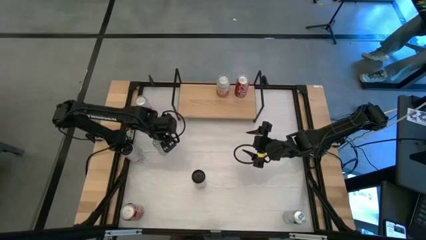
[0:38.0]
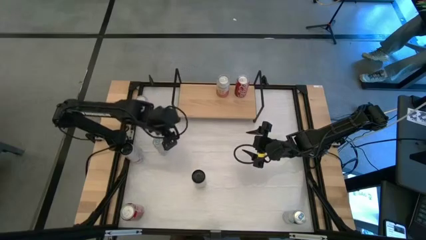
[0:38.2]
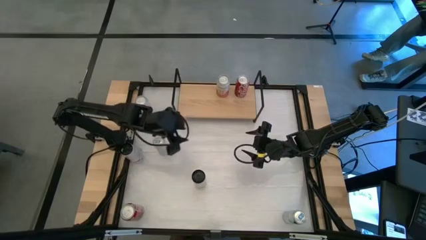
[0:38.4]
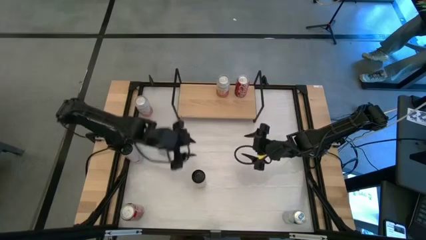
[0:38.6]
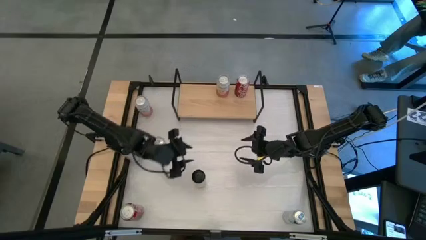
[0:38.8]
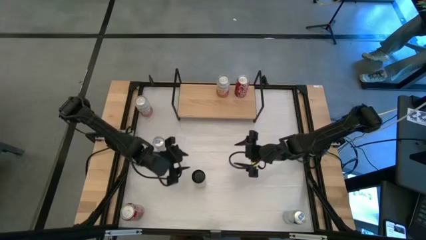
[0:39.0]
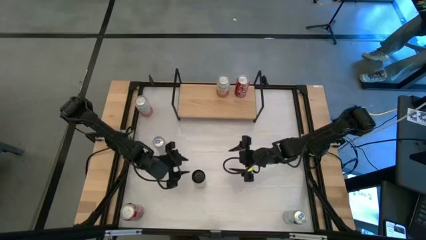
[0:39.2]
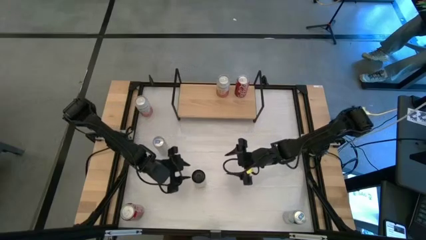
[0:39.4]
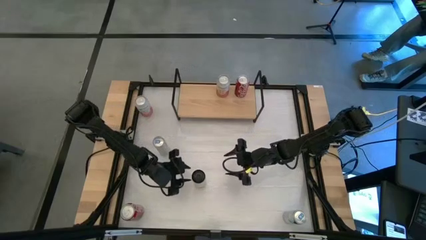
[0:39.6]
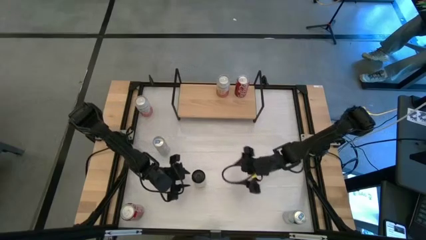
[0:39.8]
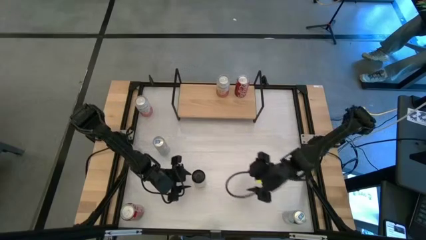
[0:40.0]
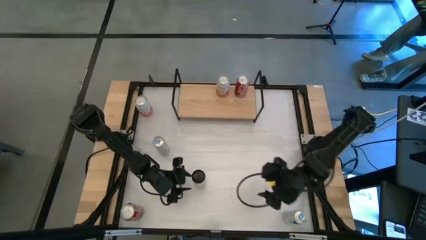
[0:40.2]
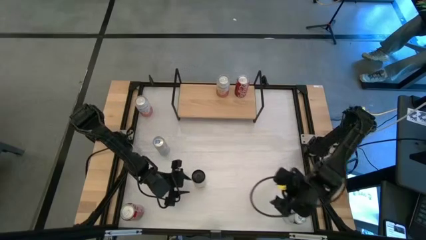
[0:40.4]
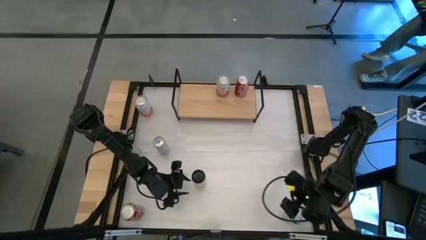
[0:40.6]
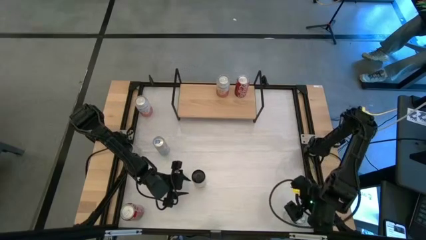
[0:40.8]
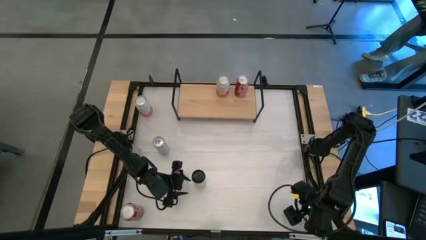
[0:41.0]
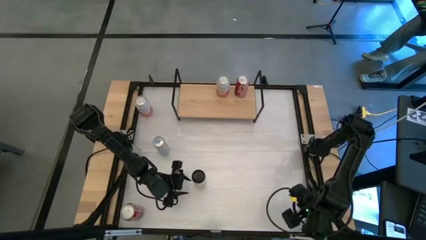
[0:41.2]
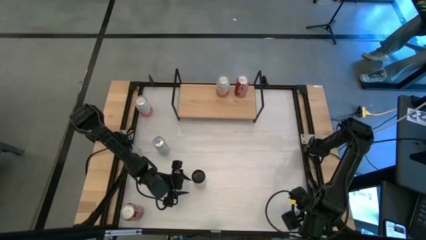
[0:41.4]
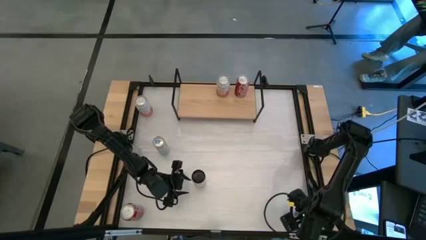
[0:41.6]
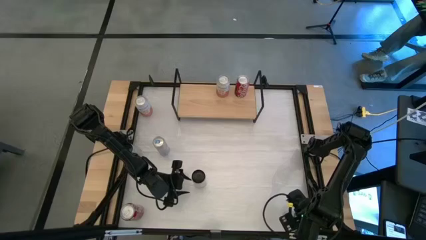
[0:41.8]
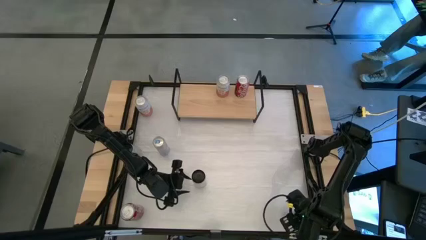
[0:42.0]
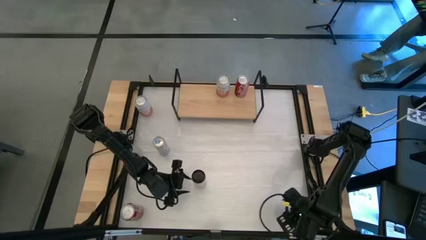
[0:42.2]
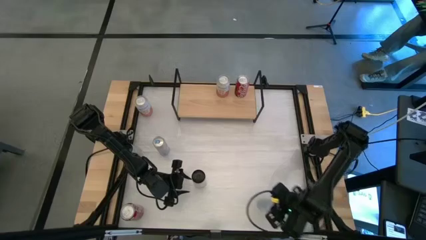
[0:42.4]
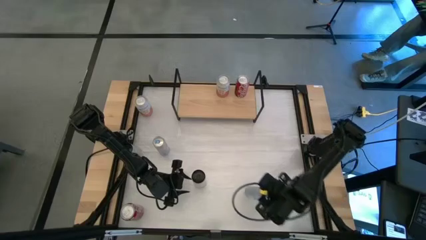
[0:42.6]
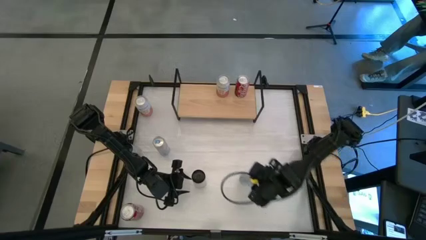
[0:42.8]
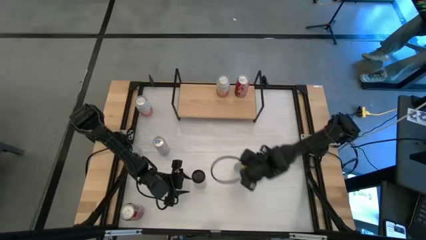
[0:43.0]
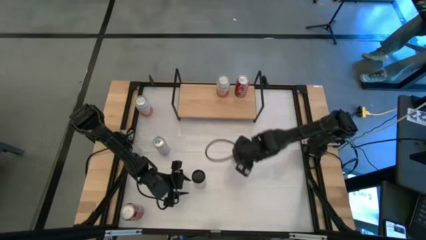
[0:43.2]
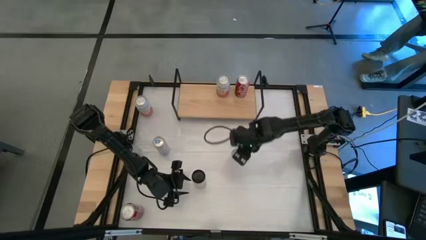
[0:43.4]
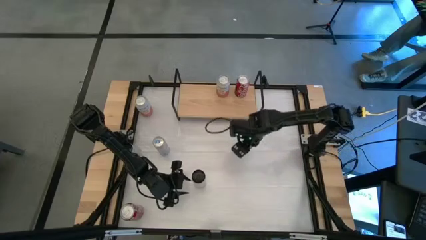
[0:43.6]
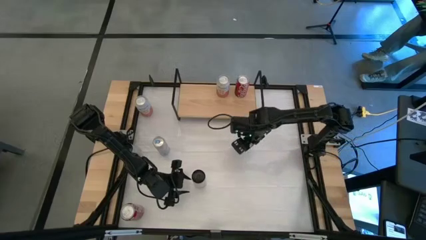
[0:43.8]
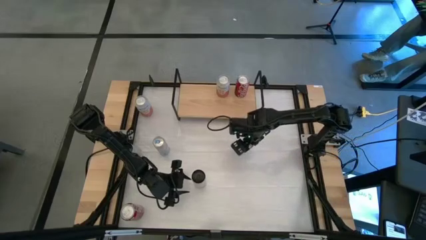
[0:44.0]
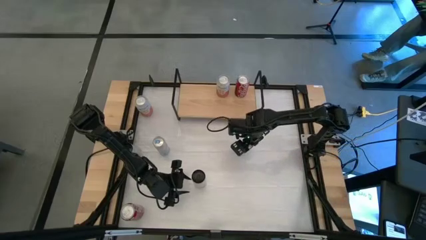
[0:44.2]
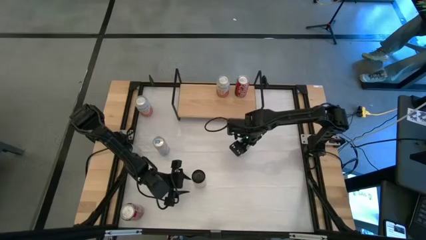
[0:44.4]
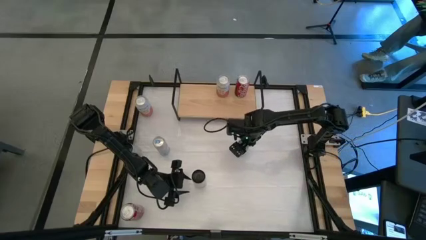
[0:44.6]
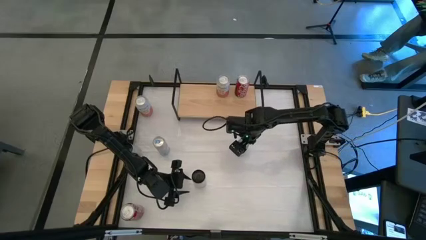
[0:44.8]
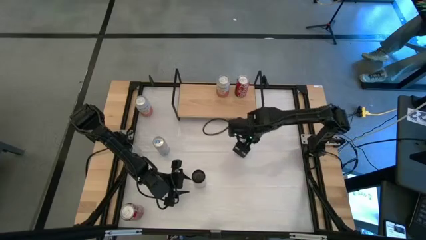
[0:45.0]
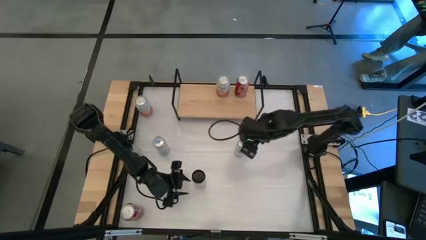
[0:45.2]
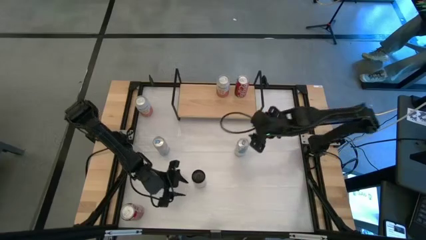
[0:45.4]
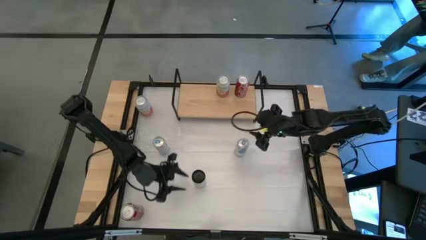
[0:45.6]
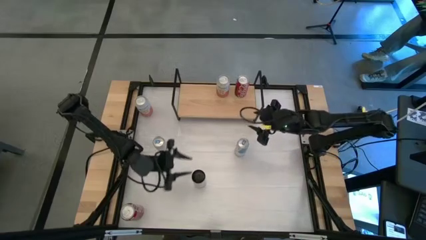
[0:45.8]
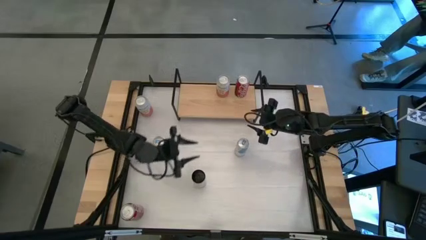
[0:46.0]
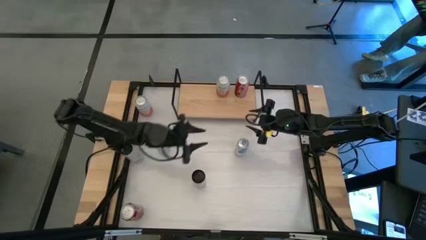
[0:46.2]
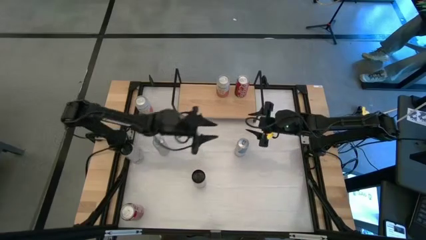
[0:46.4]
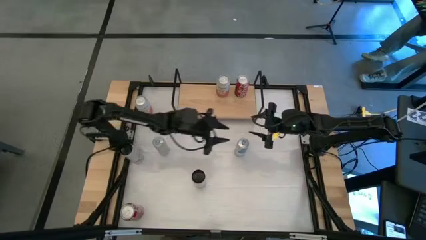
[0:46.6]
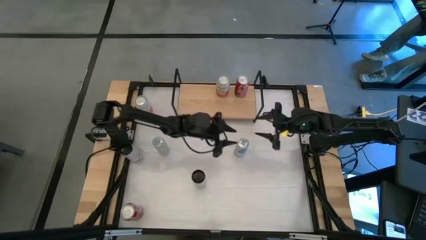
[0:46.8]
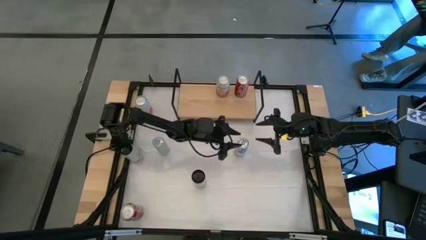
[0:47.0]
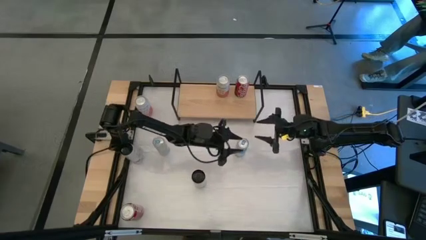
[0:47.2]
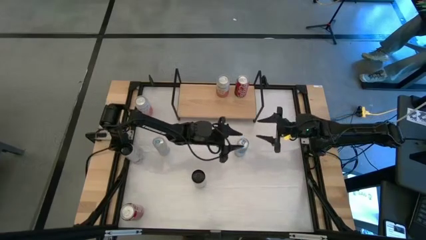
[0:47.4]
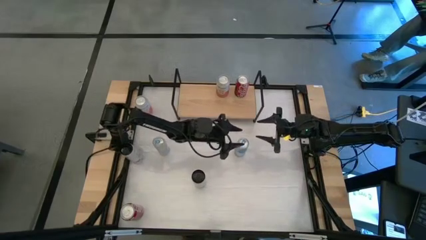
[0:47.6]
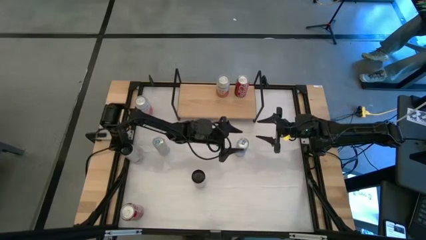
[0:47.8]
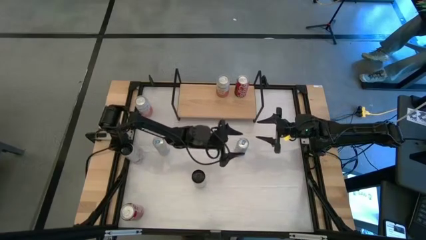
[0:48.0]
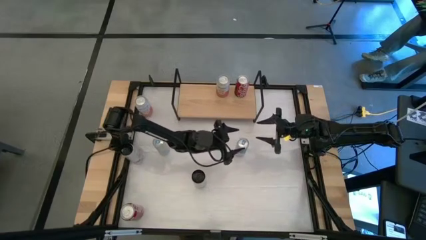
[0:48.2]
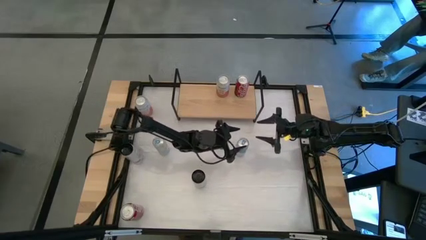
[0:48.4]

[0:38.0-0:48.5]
Task: Place canned beverage on shelf
Put the bottom blue soda can on the shelf

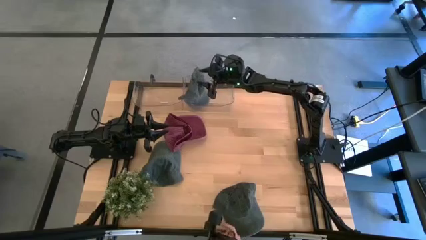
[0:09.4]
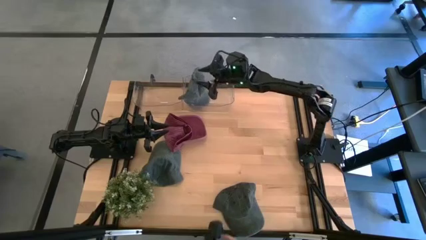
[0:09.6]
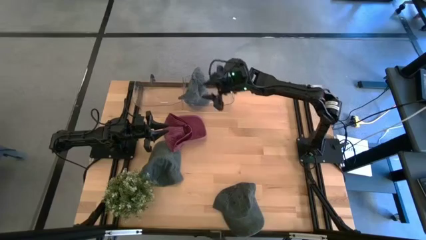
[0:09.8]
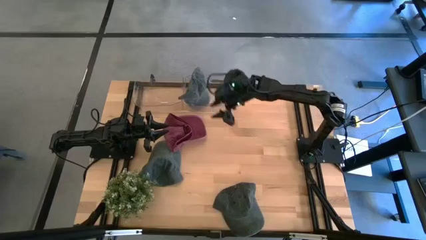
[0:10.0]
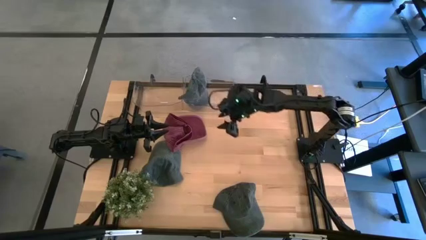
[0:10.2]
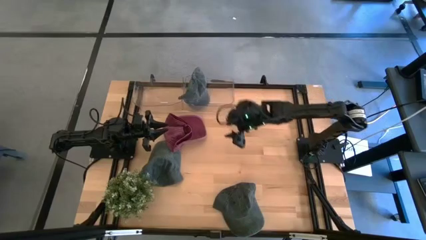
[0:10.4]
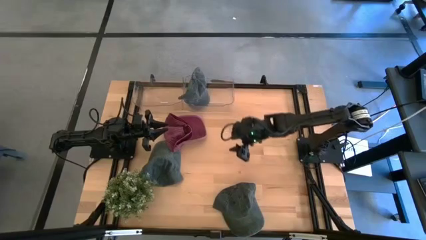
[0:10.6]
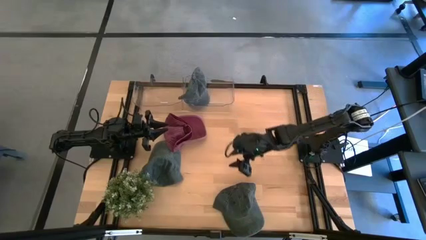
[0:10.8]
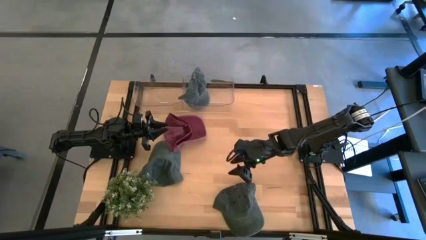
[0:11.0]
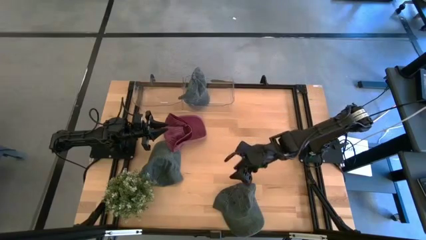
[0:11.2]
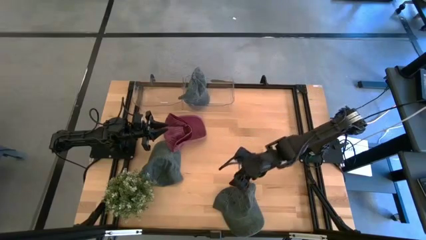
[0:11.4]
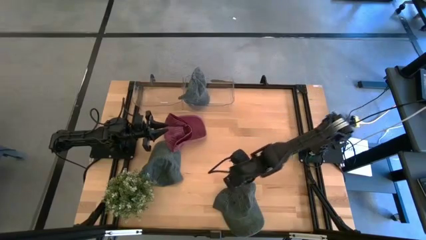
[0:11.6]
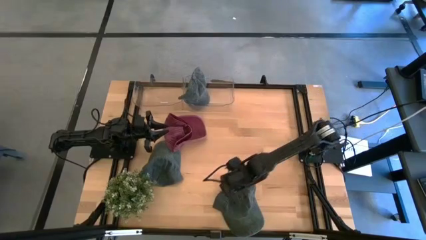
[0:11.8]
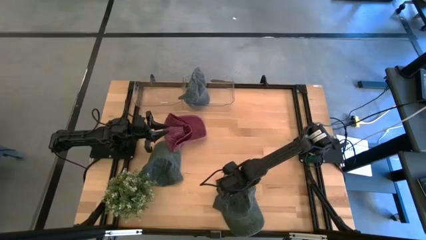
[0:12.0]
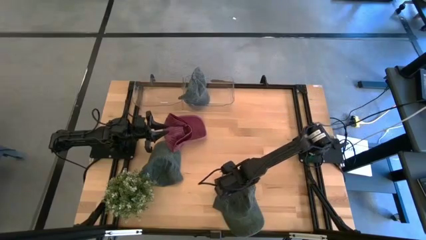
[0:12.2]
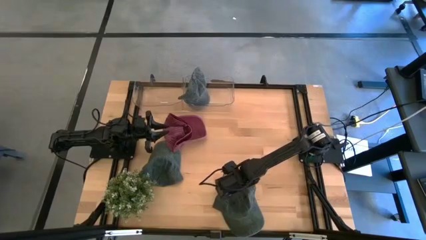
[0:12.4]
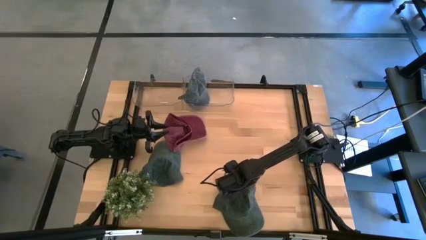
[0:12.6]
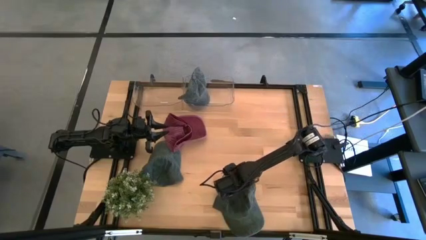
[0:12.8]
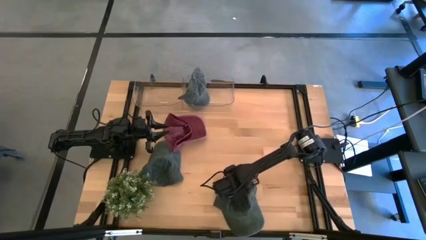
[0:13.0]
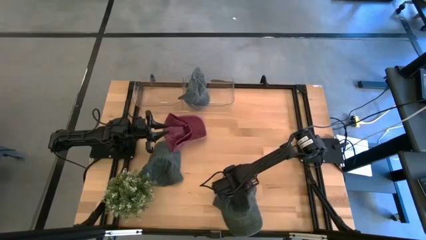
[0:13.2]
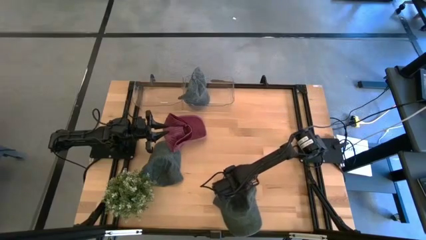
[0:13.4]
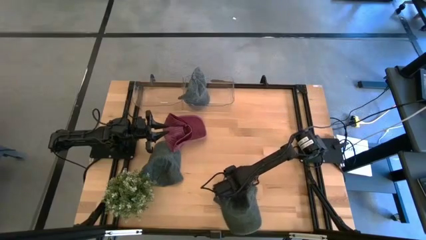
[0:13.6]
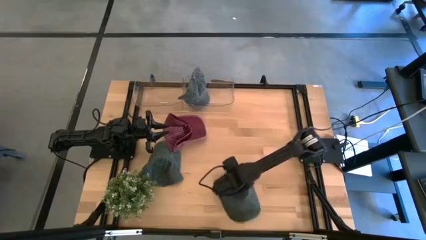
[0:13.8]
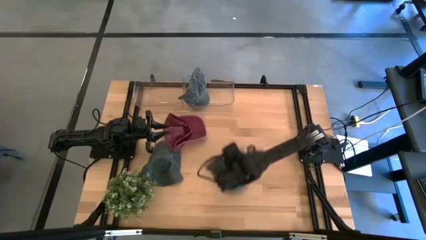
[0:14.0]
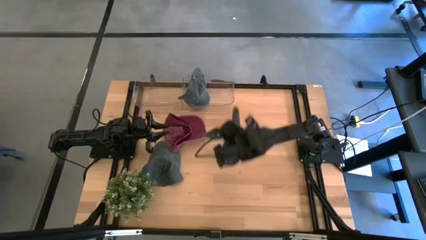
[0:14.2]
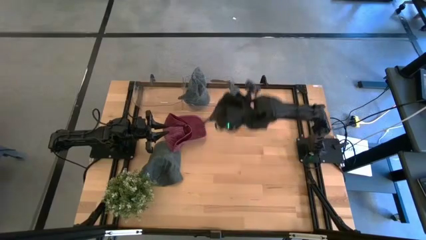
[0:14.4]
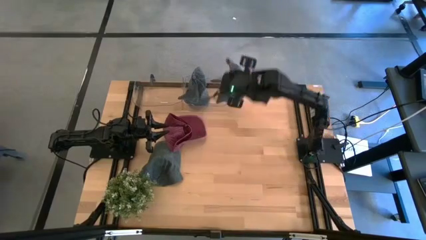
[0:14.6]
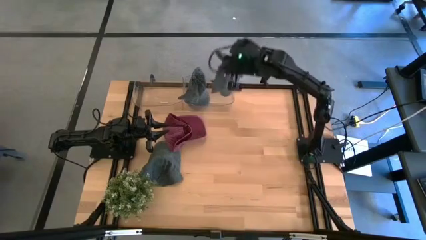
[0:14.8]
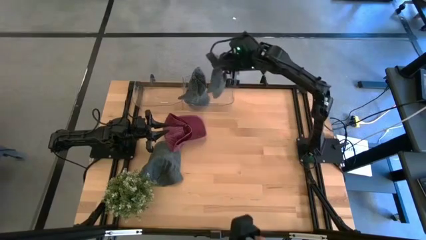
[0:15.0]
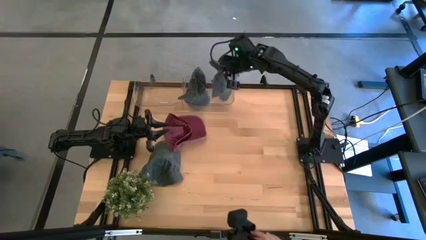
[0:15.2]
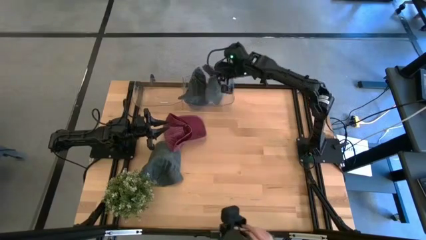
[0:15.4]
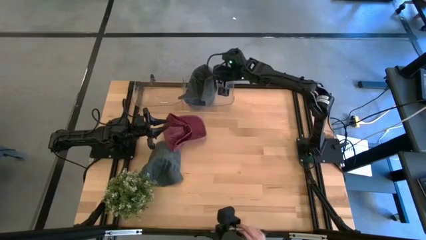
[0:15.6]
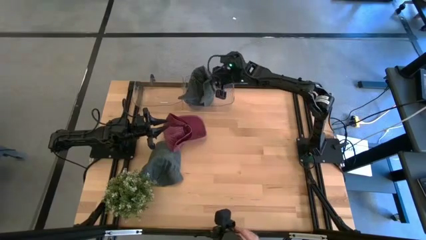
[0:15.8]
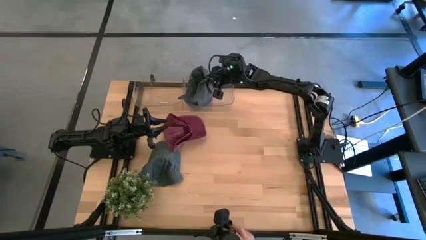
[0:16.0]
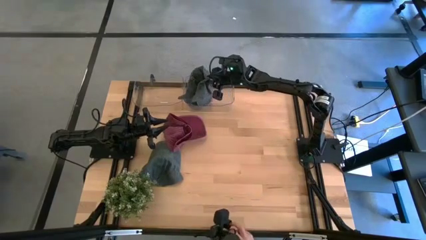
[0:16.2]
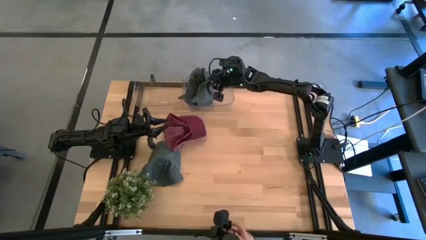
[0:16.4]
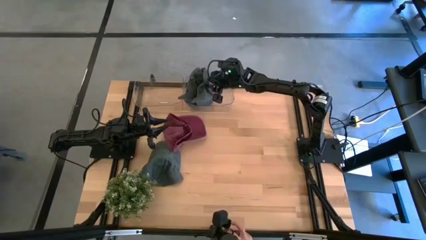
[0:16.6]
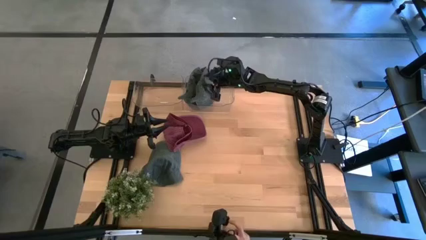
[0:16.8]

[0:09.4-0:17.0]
Task: Pick and place caps into container
Put the bottom blue cap into the right transparent container
